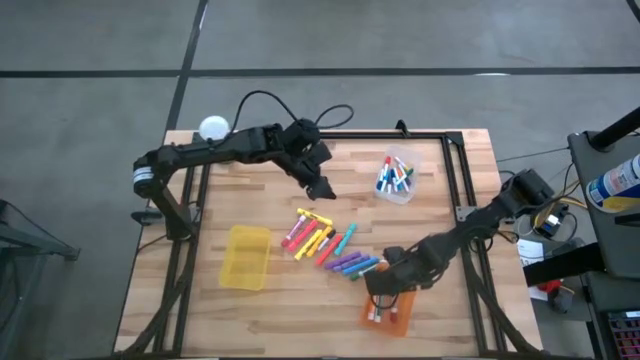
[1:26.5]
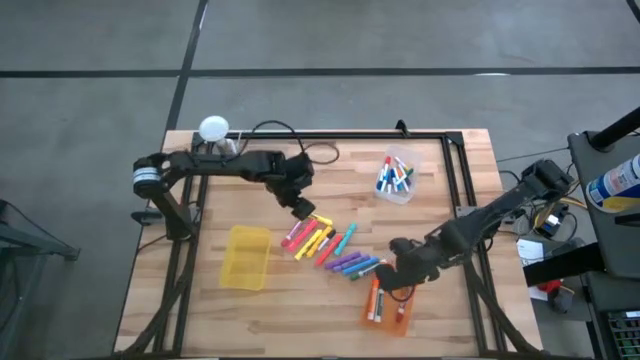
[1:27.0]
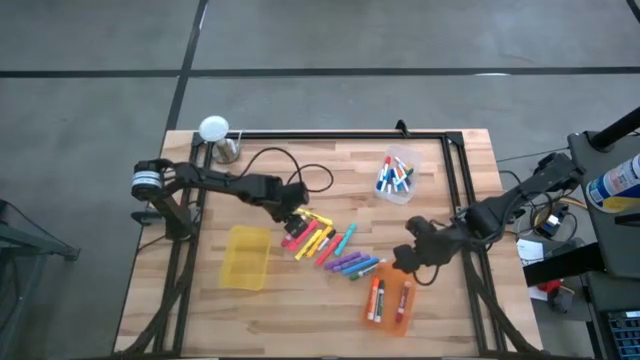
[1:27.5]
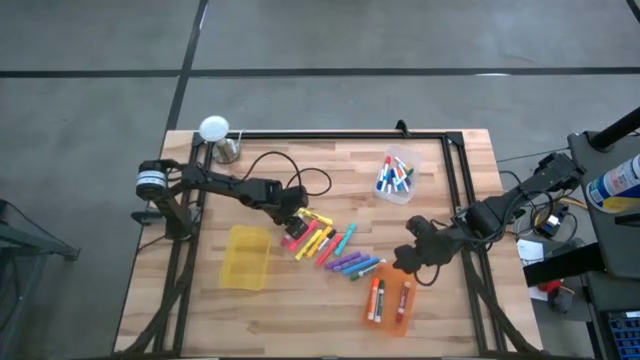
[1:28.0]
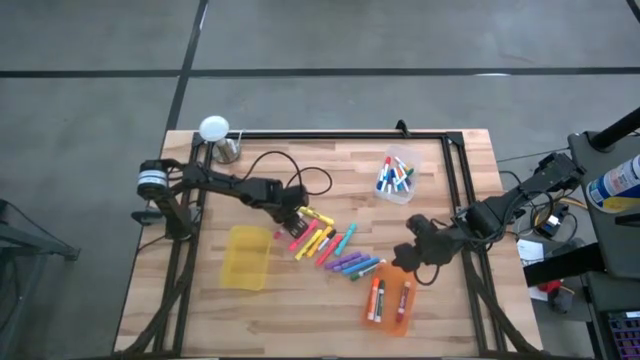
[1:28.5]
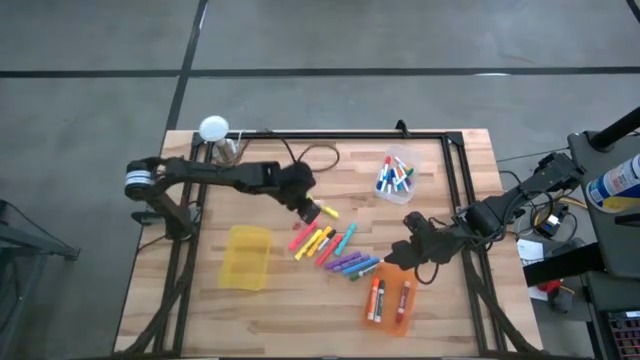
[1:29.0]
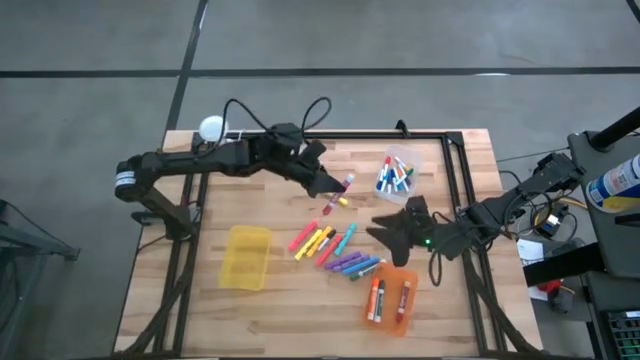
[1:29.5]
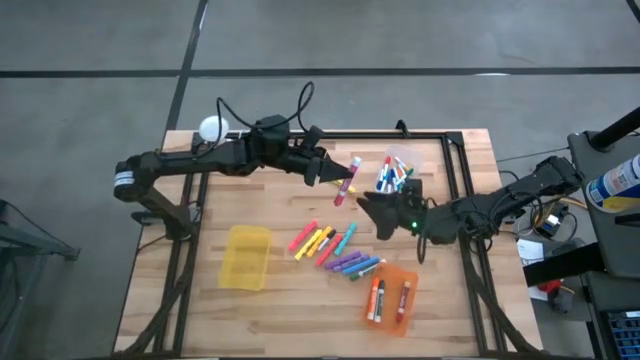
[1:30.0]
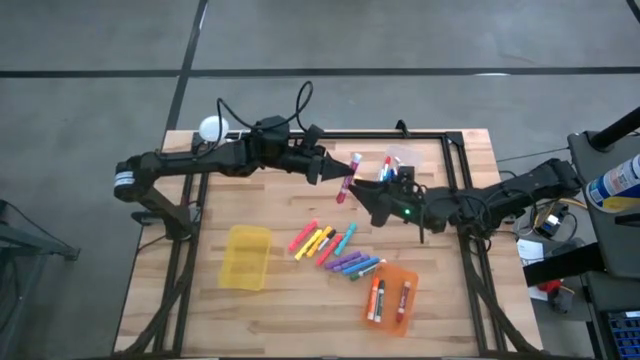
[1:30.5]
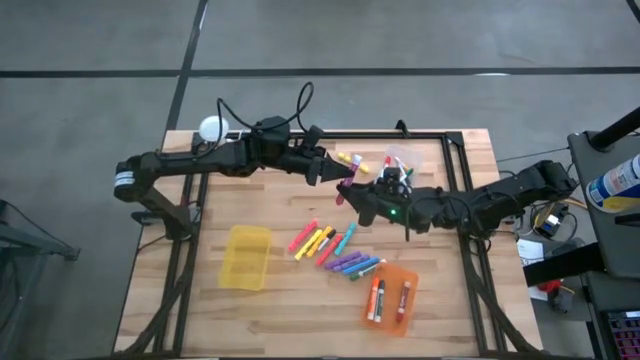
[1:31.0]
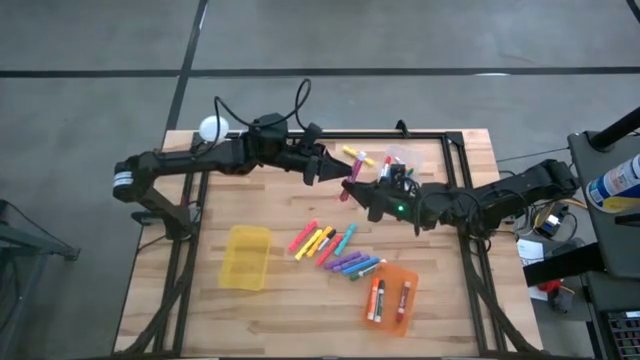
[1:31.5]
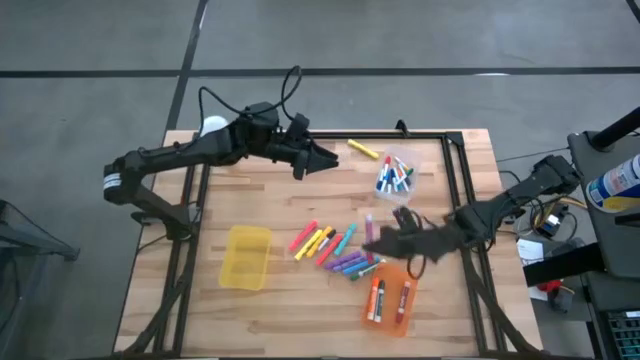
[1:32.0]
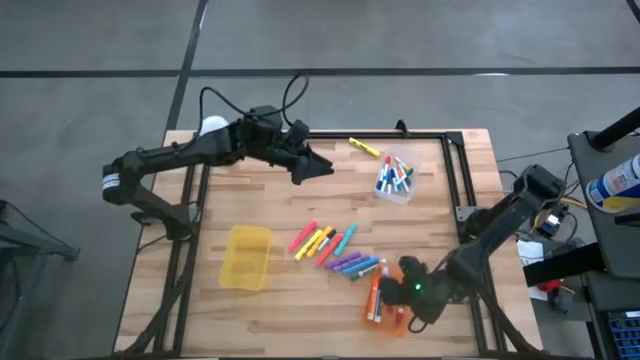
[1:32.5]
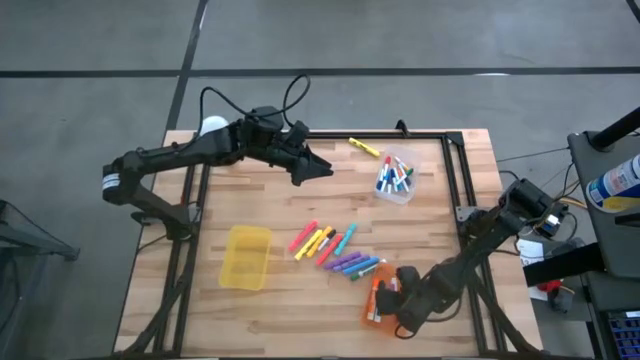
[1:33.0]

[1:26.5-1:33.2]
Task: Pick & Place Markers
Put the pink marker pen into the orange bin

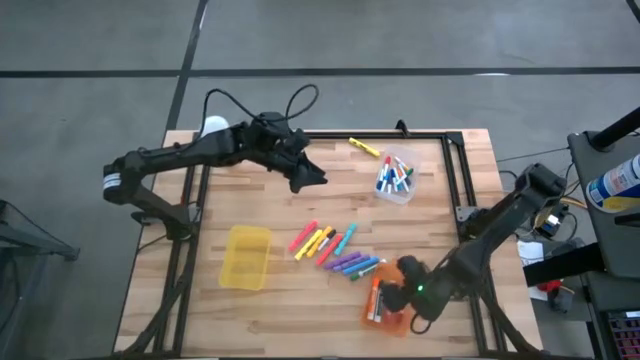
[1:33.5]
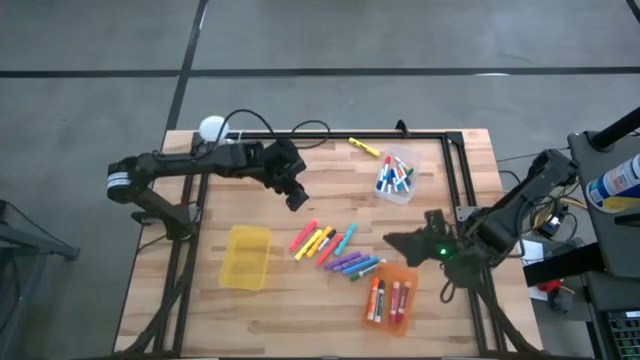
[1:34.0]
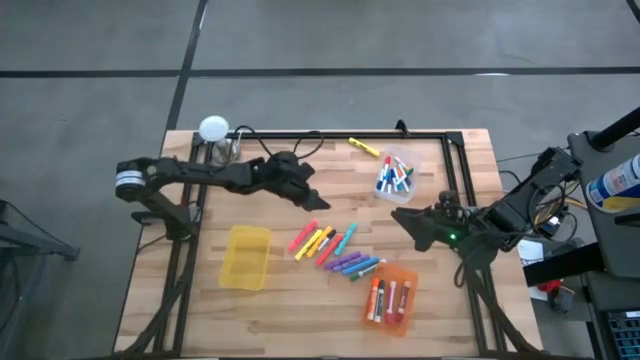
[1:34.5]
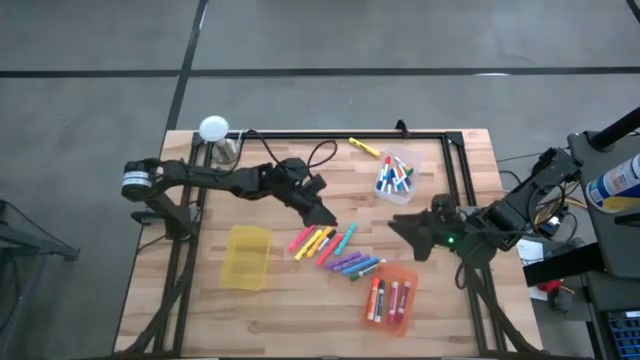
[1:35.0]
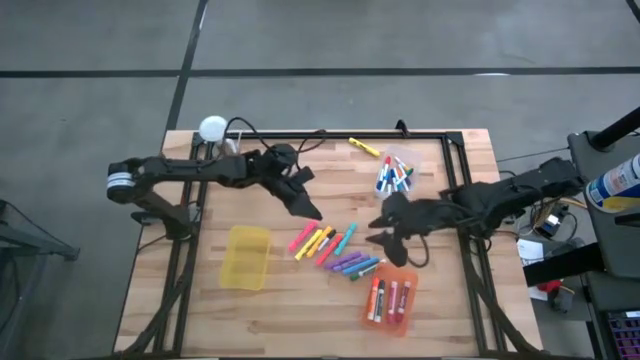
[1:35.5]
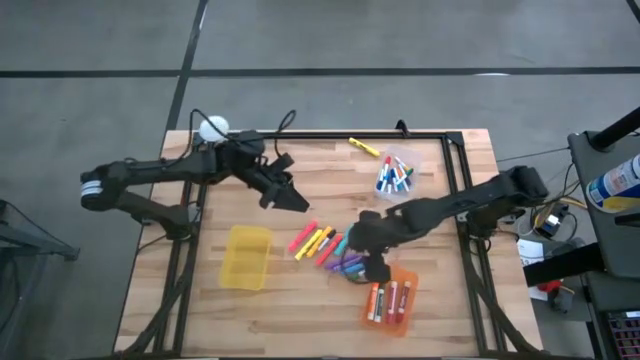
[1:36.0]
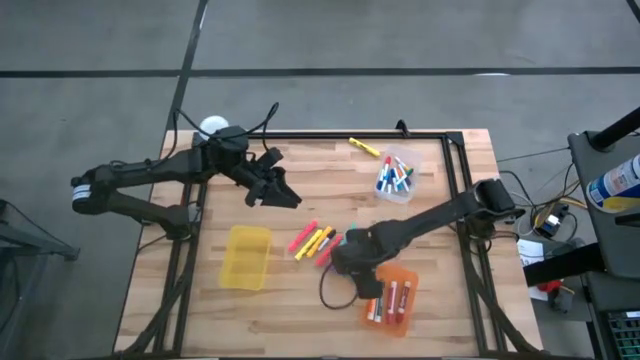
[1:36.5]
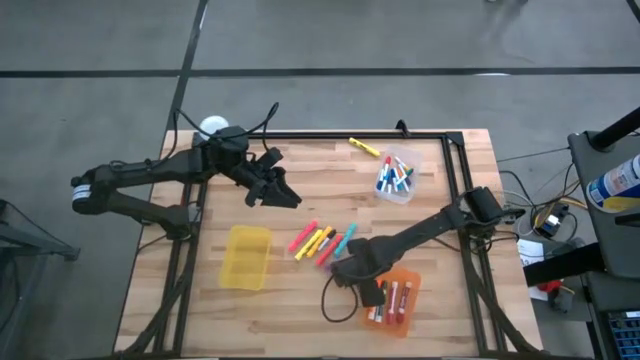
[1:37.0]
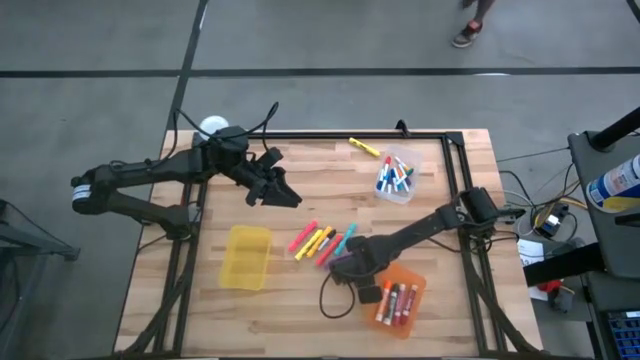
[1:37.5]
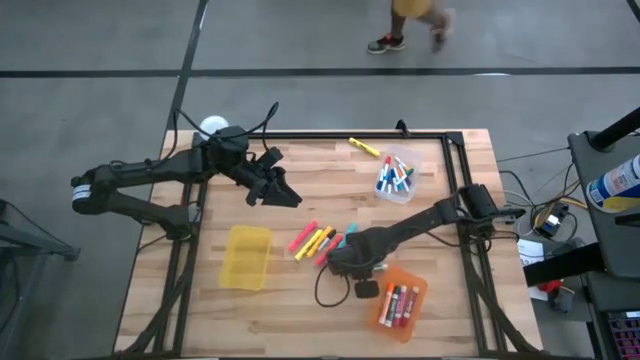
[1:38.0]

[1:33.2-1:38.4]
Put the green marker pen into the orange bin

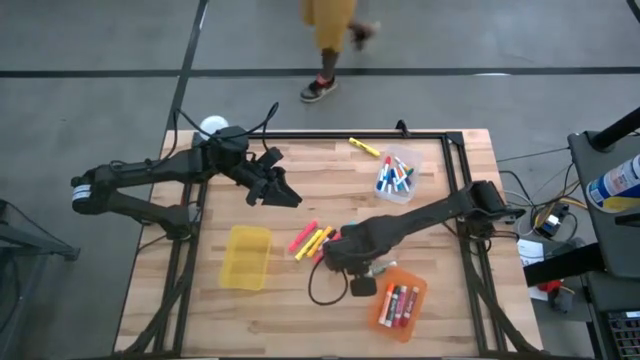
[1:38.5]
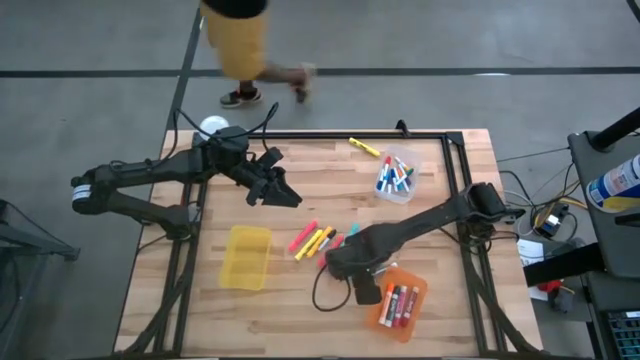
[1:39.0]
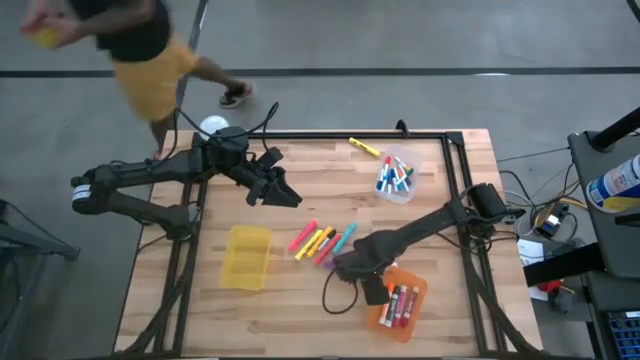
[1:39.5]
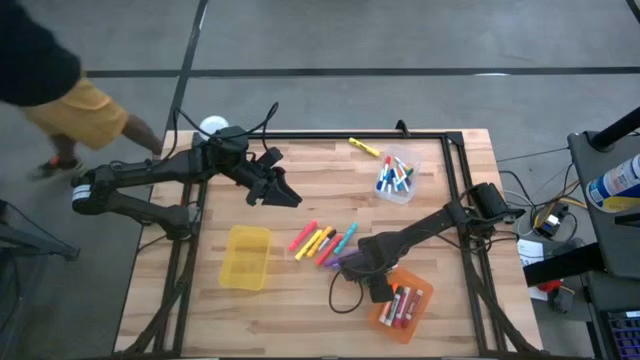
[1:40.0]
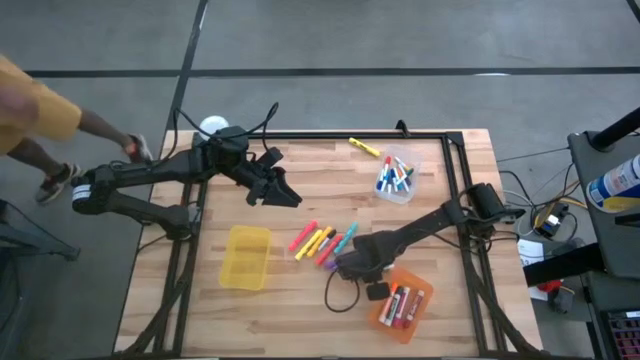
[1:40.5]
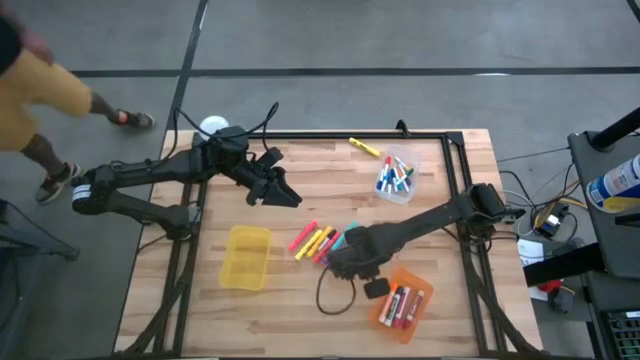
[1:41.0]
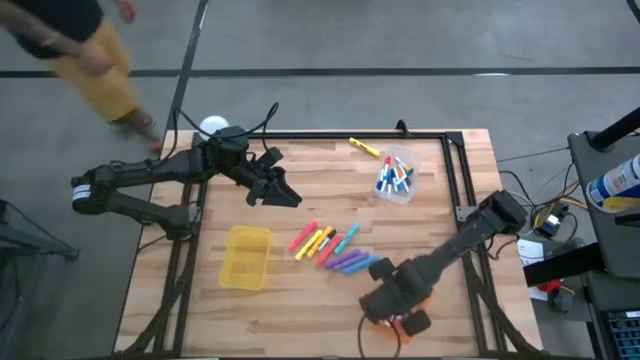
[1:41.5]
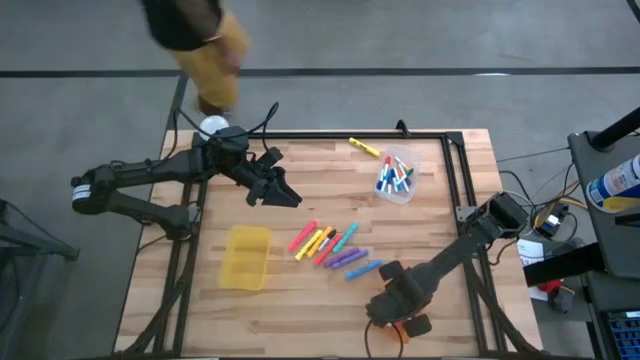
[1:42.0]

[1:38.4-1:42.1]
Put the green marker pen into the orange bin

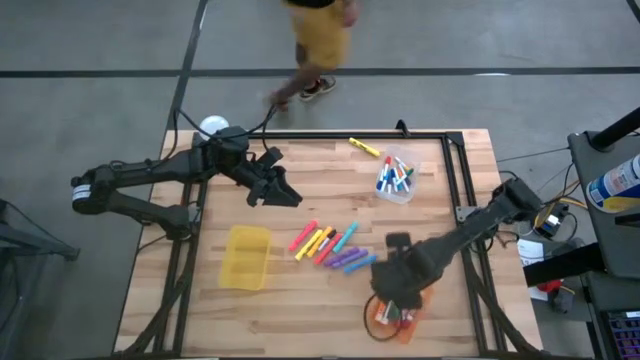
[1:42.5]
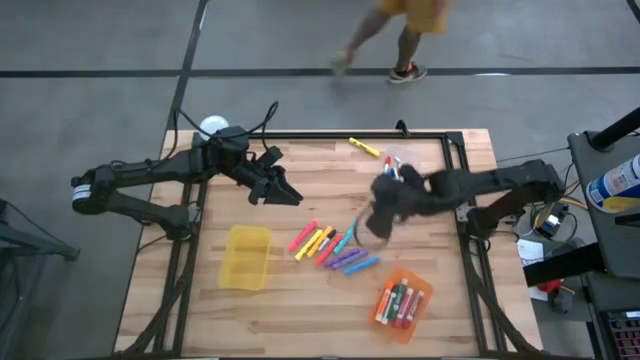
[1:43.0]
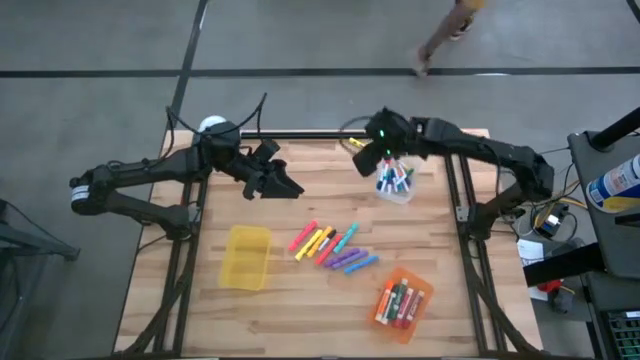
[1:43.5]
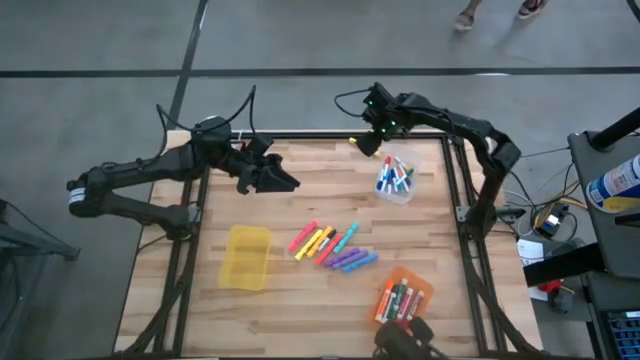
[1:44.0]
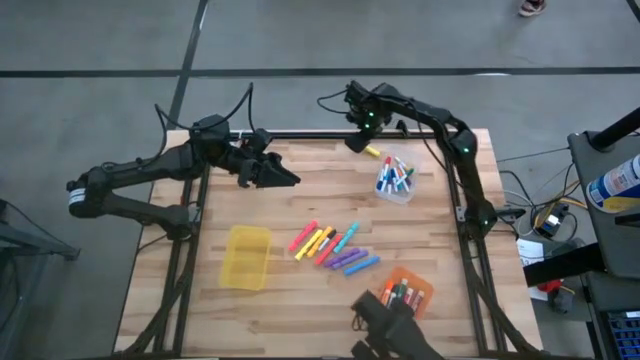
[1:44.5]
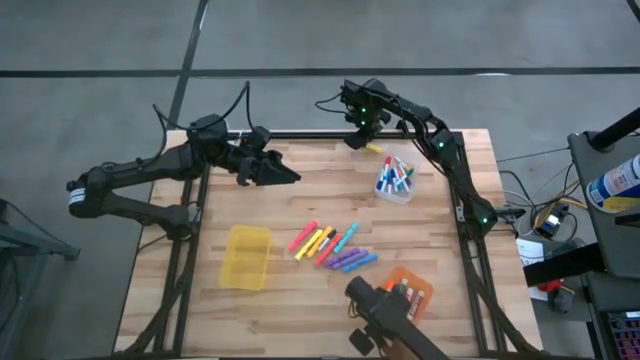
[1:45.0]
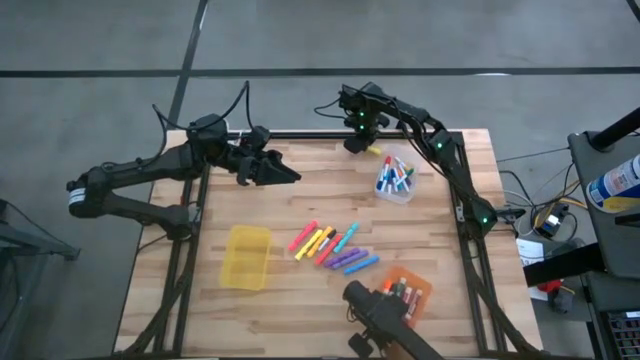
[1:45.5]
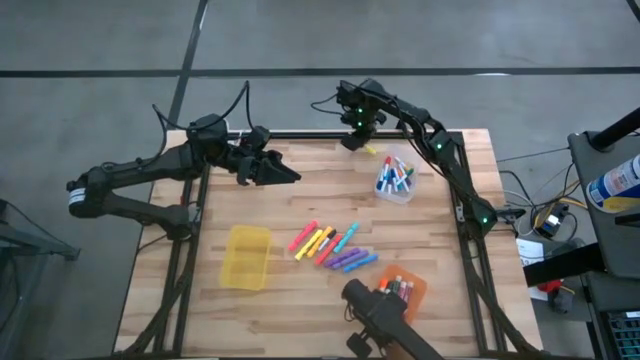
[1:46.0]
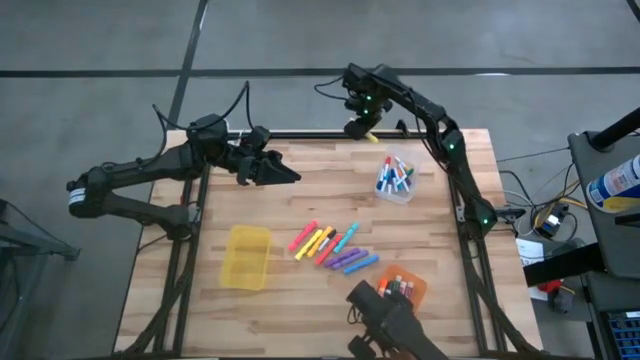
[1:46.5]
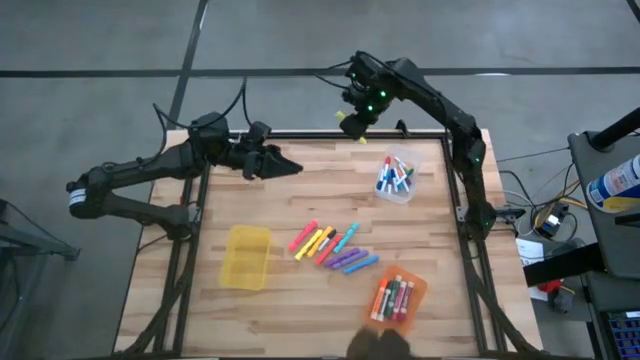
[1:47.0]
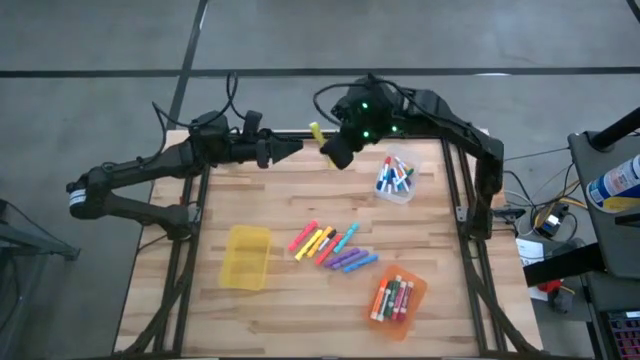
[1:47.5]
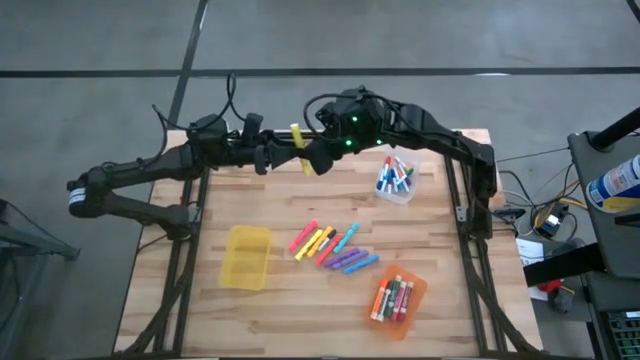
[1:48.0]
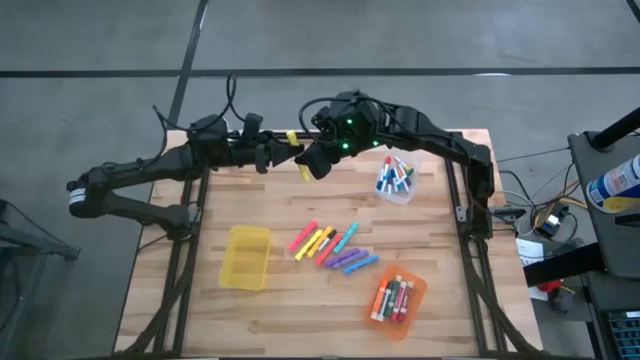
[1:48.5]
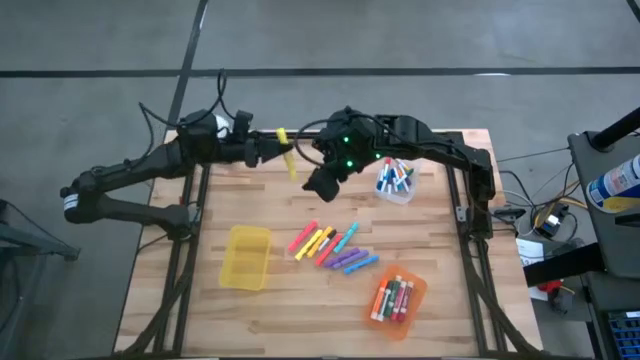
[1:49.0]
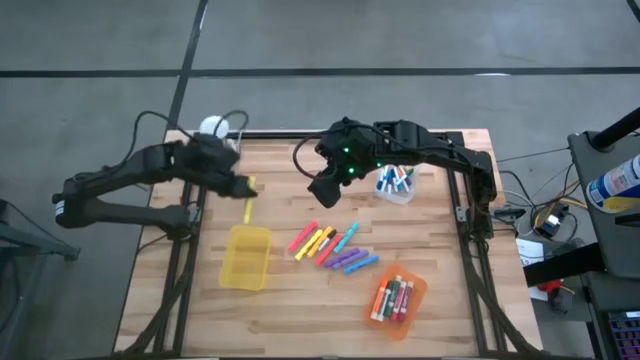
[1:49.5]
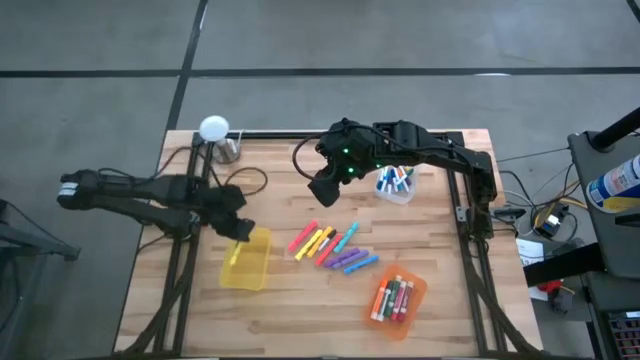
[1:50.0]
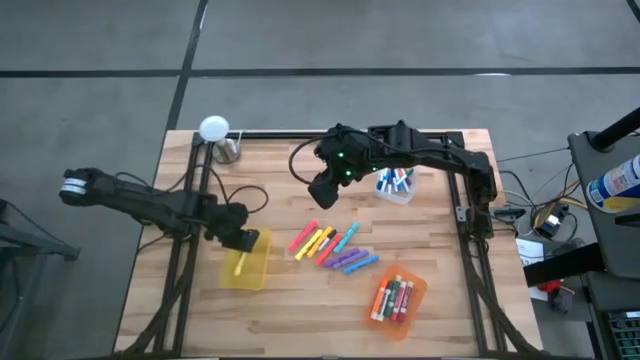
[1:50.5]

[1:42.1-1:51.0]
Put the large yellow highlighter pen into the yellow bin
